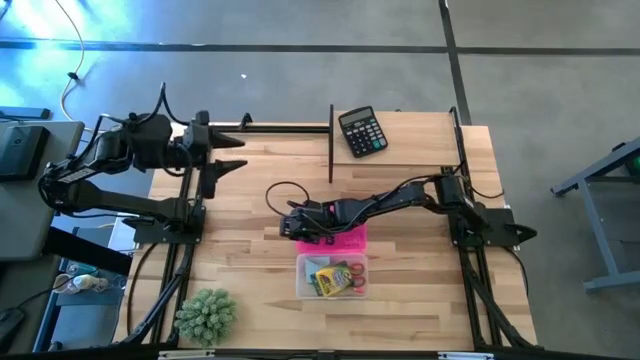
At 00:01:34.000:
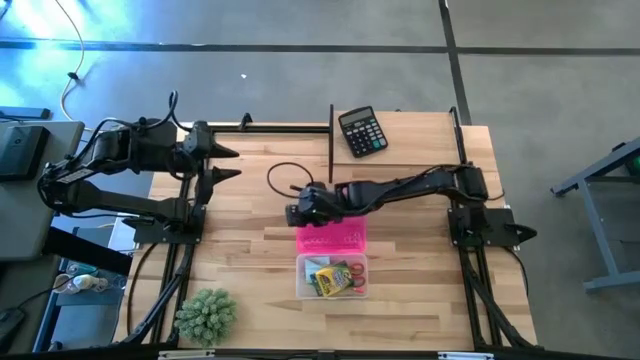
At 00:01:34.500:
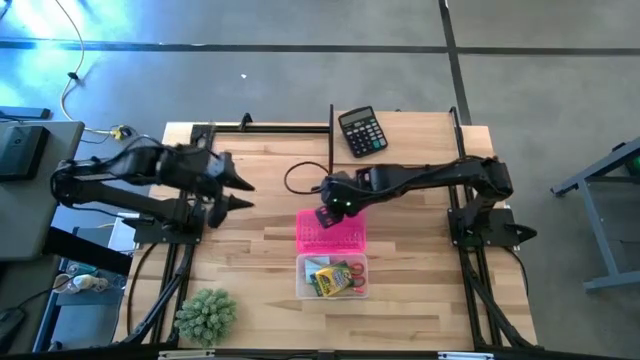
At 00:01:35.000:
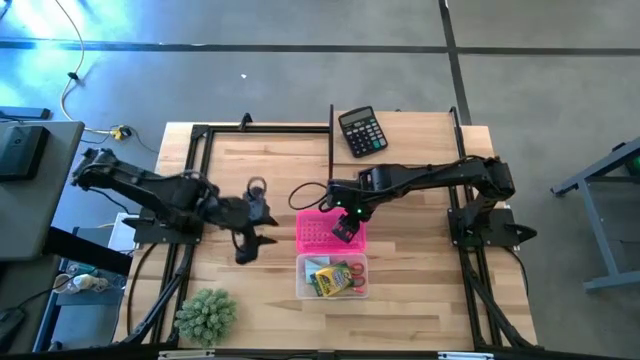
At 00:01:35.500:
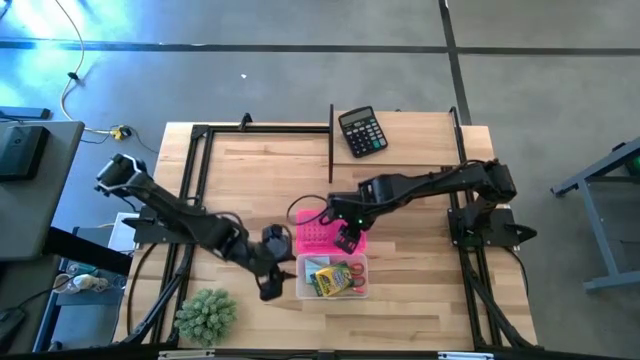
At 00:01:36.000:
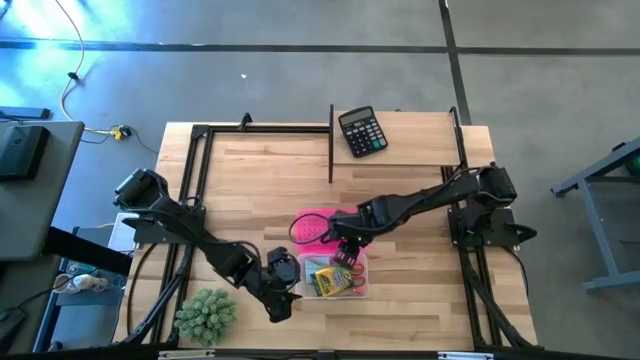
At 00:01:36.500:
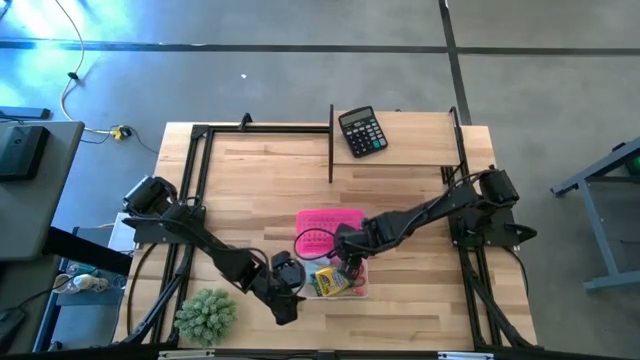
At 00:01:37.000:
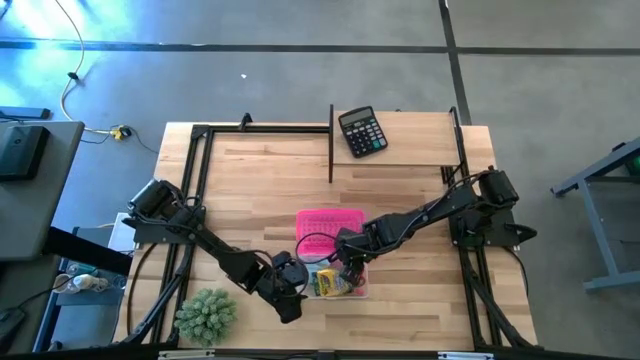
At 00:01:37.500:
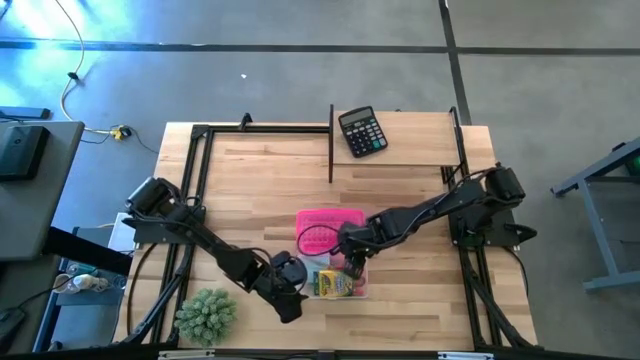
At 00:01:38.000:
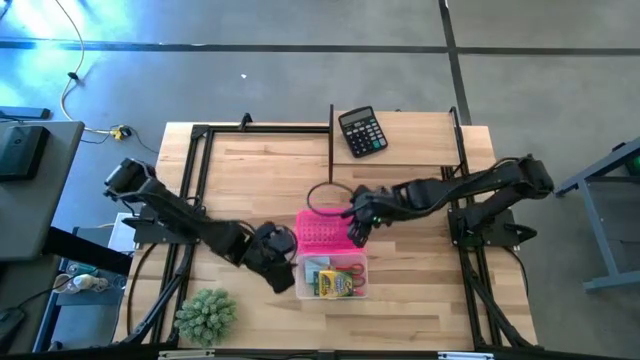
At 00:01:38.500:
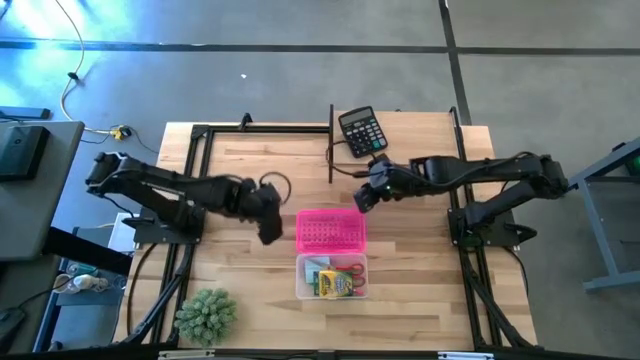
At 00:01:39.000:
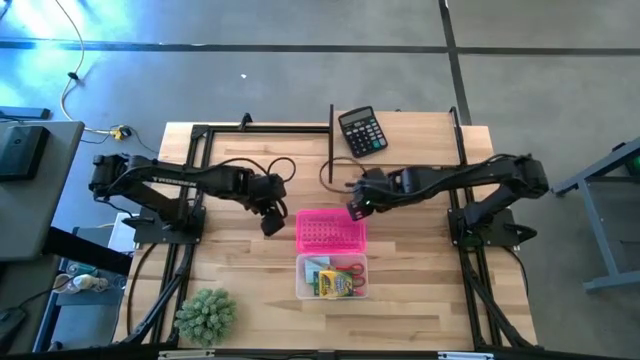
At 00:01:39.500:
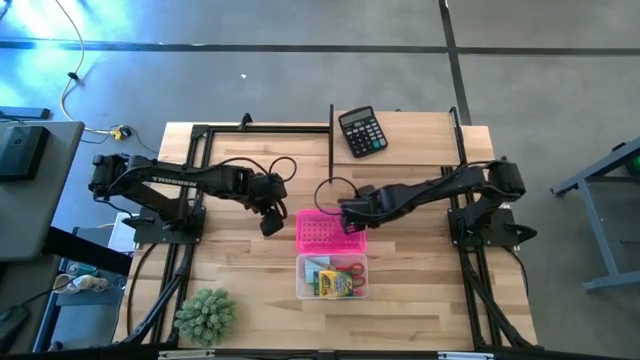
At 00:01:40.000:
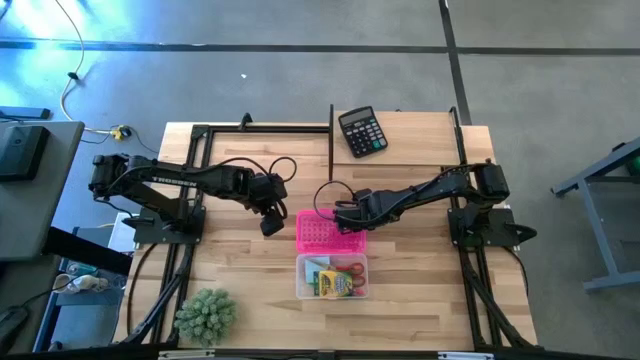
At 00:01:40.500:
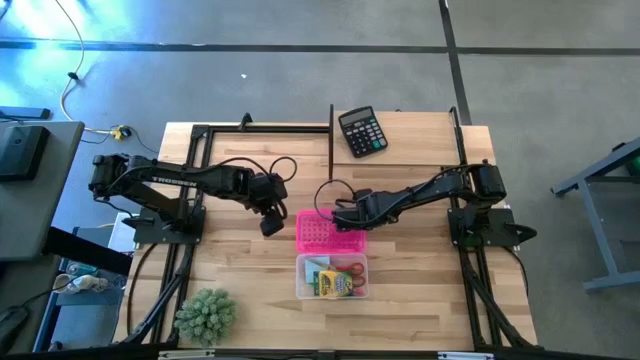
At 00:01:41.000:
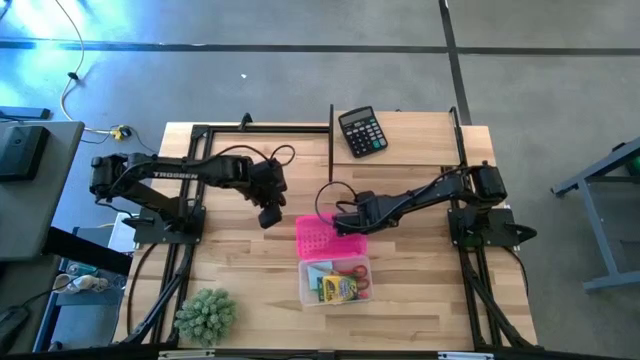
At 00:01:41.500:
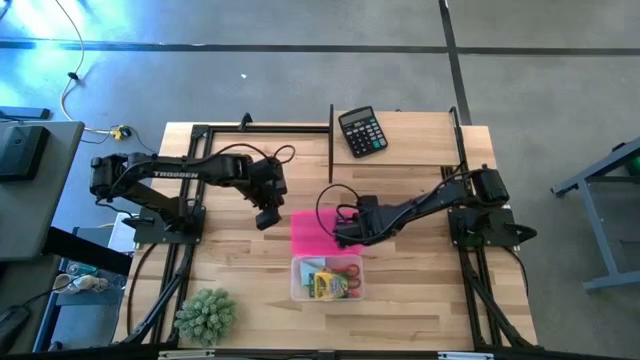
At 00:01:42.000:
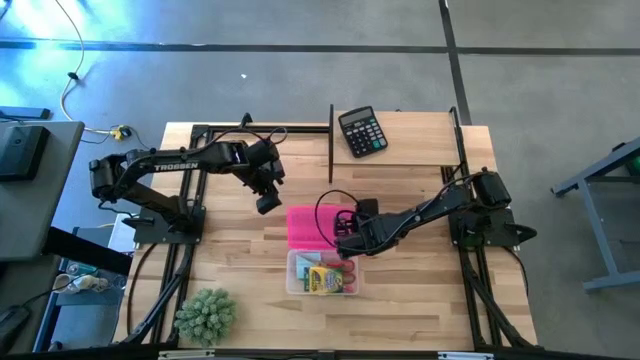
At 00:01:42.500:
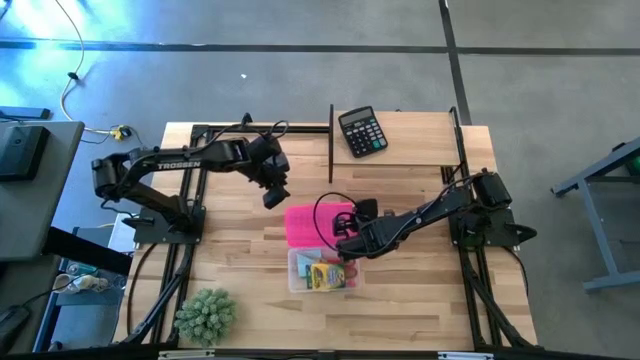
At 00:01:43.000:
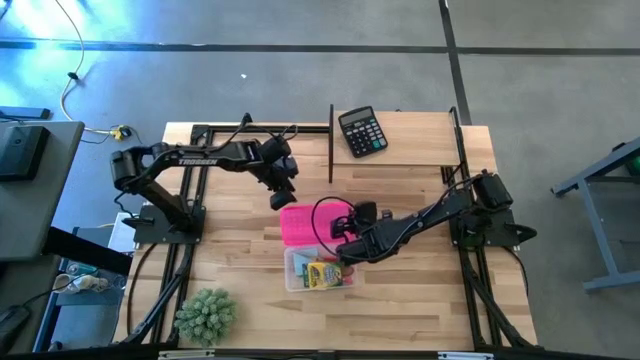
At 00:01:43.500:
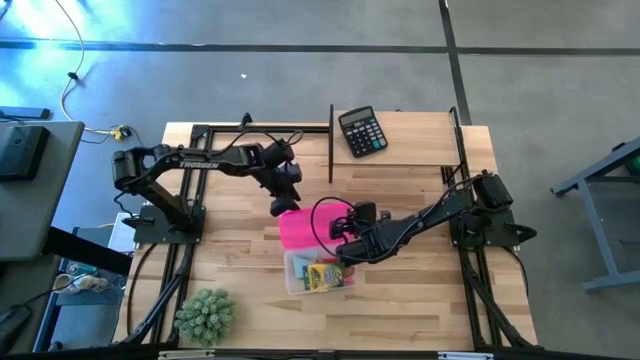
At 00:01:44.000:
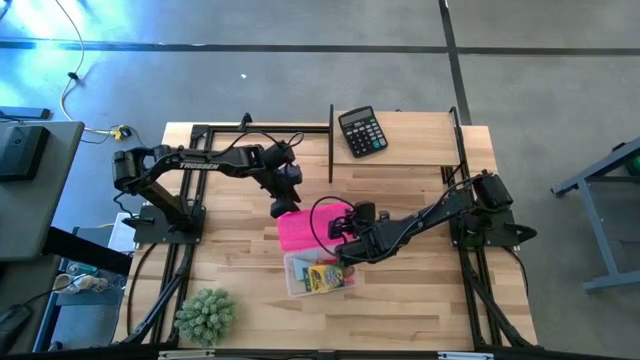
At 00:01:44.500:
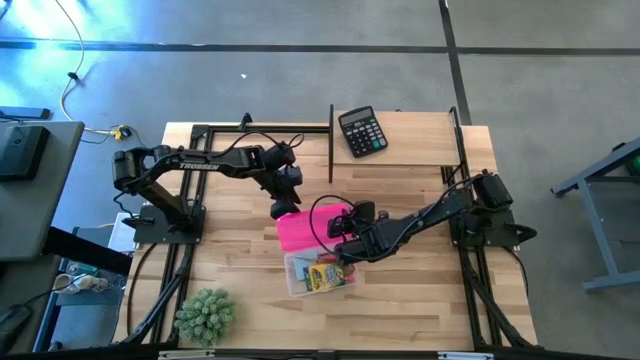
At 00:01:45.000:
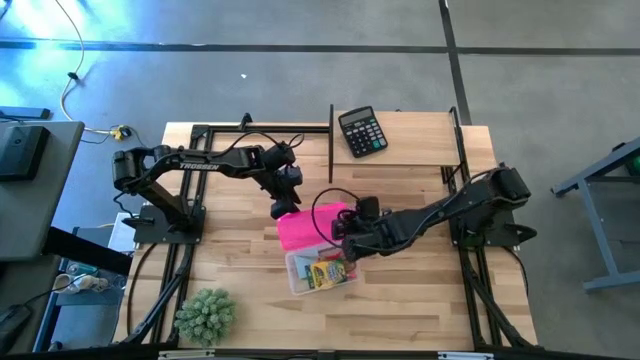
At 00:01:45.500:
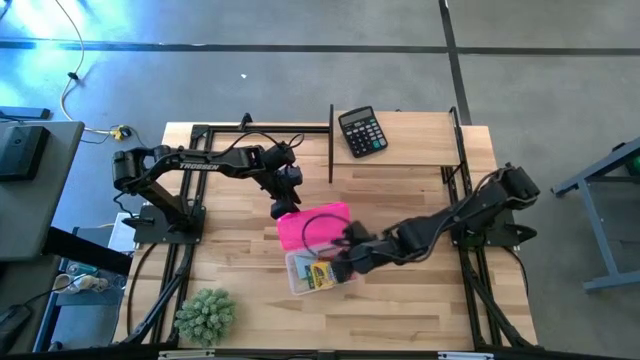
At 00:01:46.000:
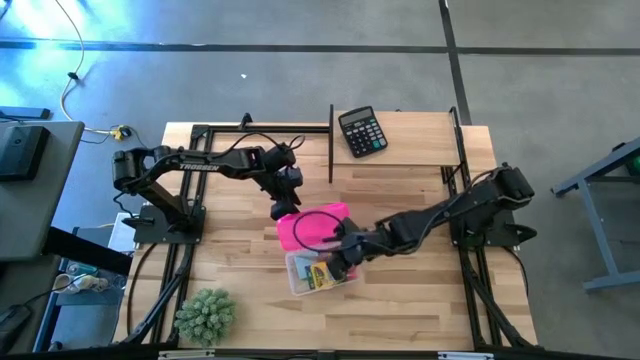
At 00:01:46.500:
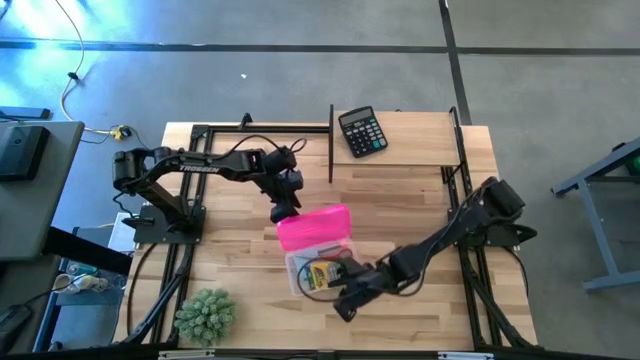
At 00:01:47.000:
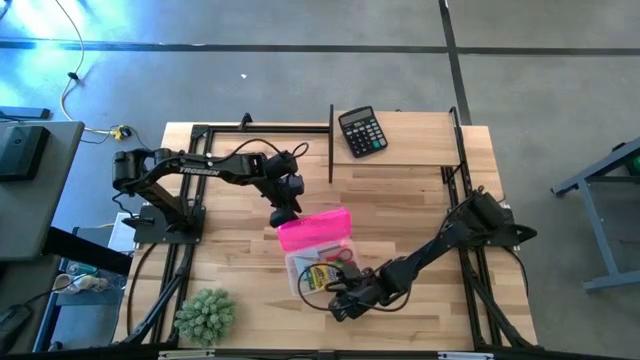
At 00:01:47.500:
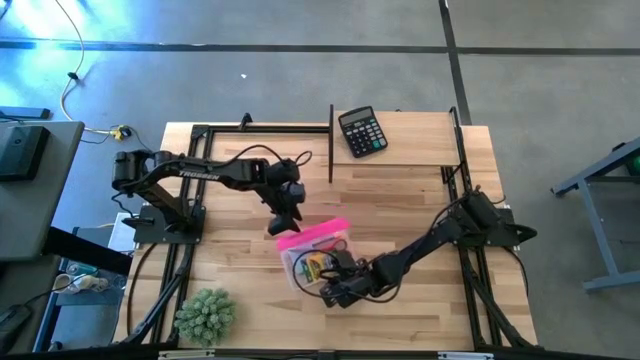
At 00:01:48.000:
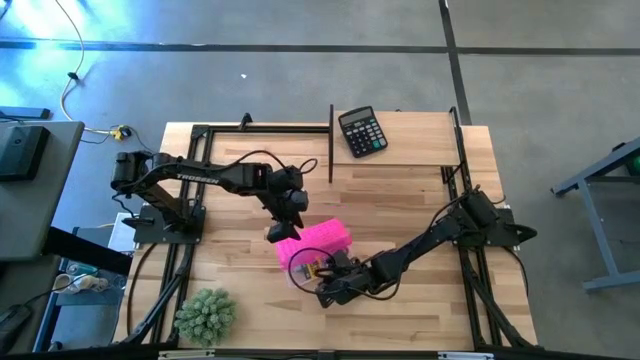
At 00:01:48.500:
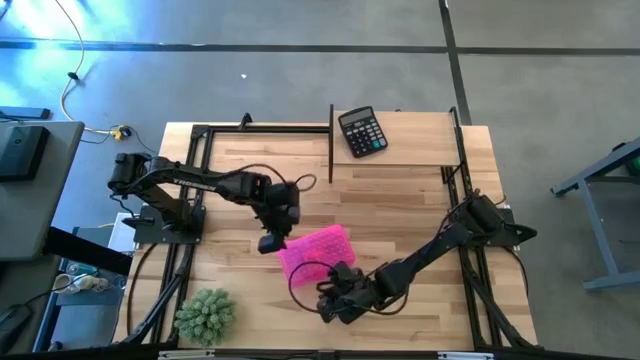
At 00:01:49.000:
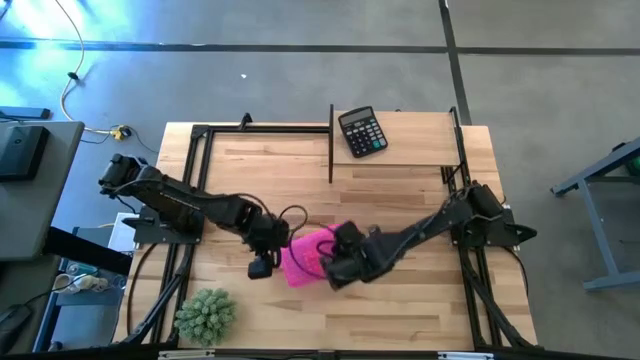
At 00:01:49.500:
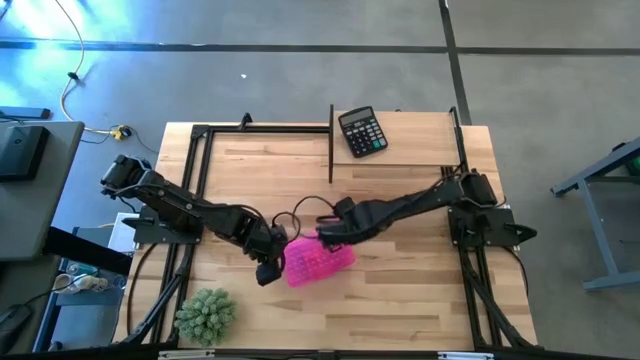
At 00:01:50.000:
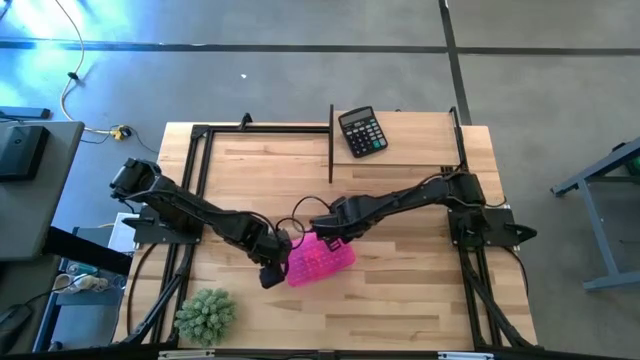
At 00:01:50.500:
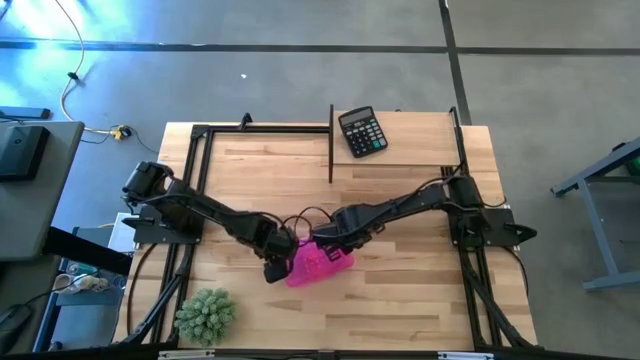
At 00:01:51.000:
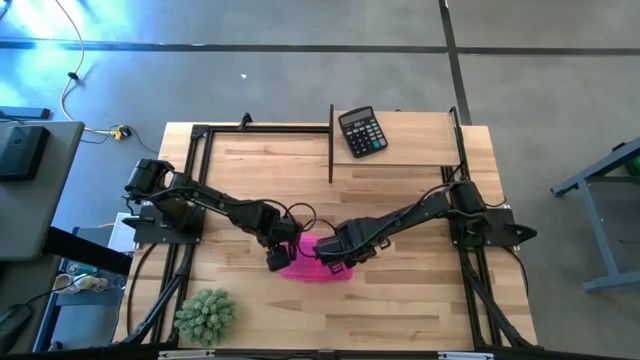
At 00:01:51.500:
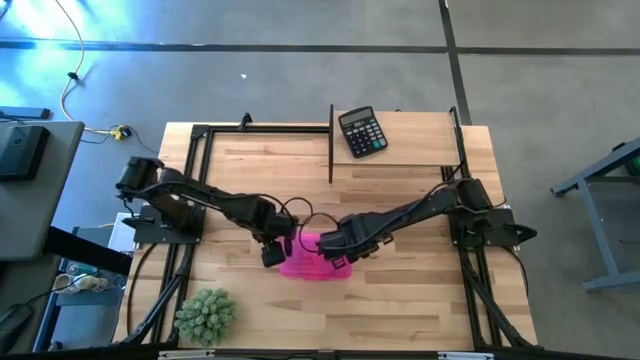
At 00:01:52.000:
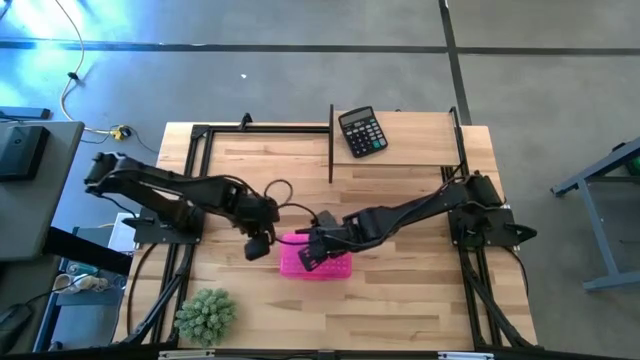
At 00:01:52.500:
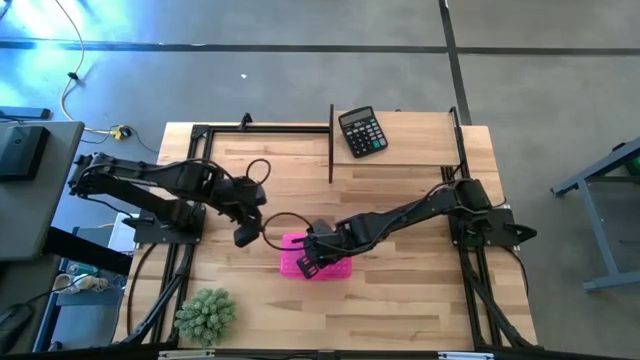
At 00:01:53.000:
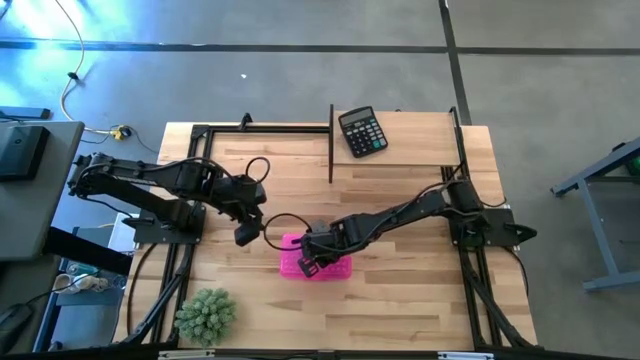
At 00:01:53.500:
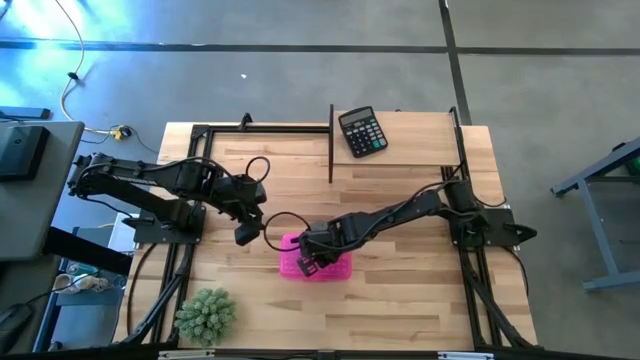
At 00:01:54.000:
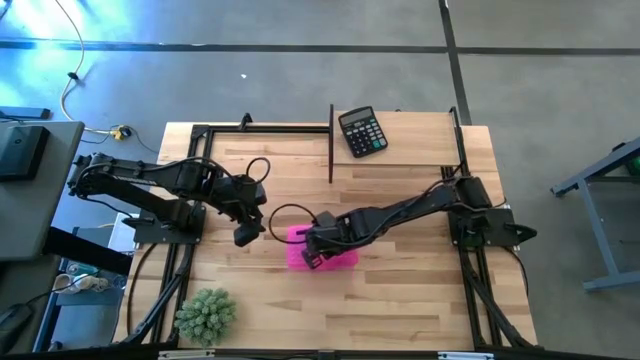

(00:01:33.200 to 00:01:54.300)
Task: Pack school essentials
Close the supply box
